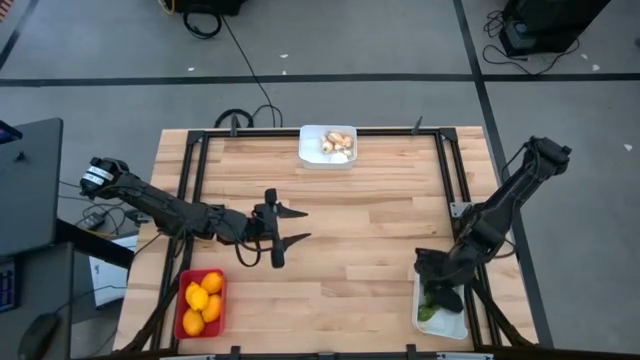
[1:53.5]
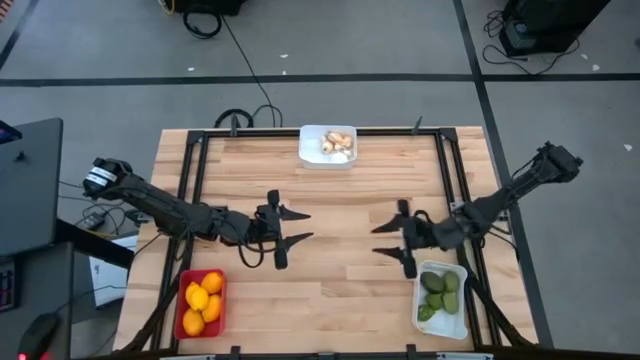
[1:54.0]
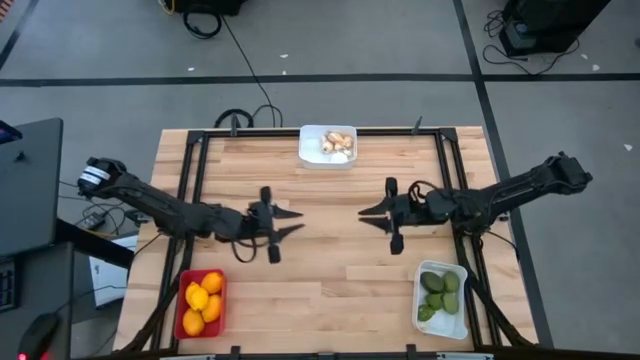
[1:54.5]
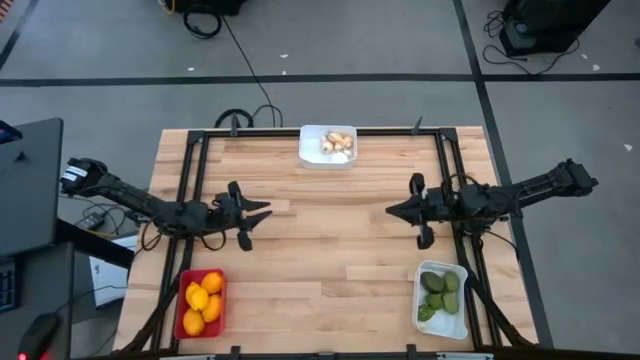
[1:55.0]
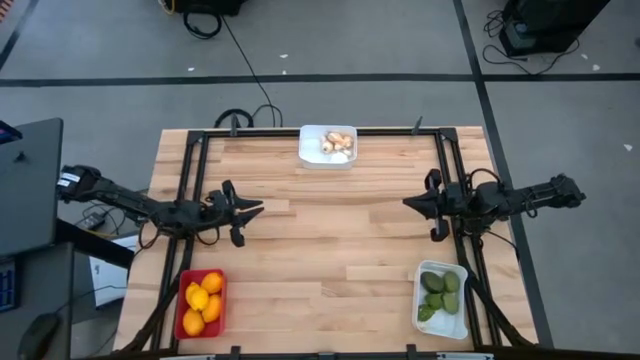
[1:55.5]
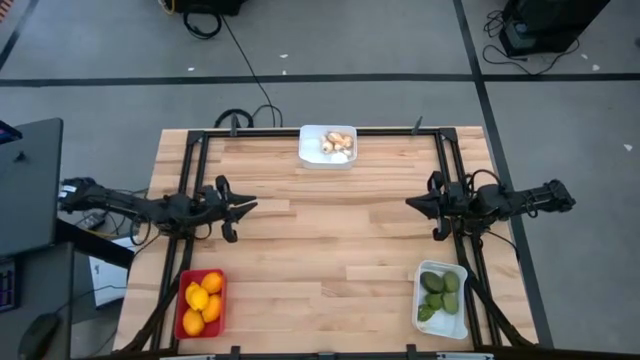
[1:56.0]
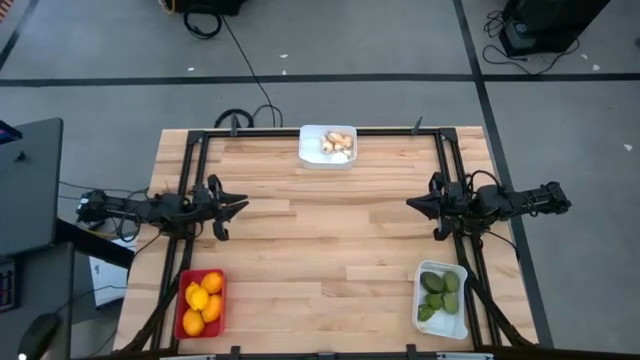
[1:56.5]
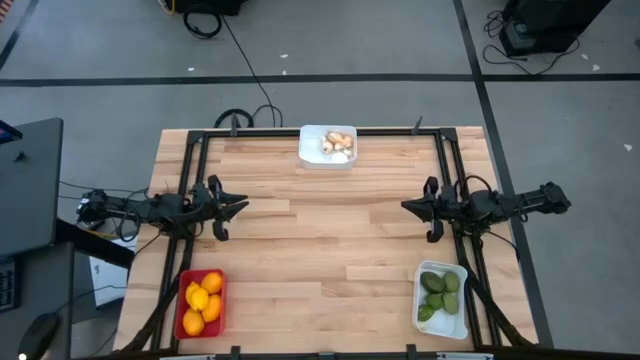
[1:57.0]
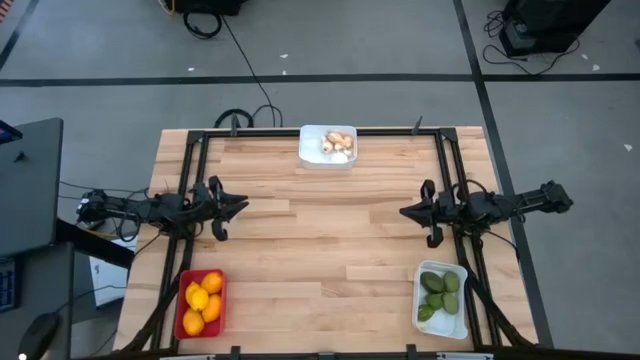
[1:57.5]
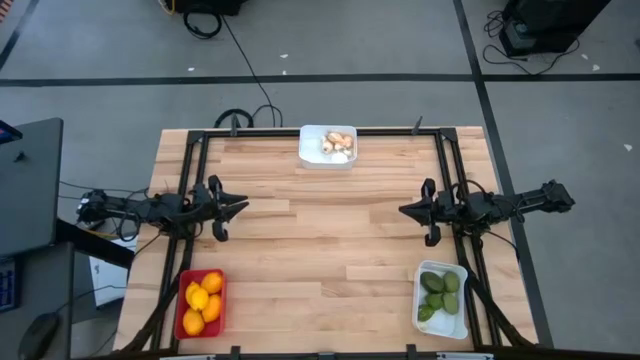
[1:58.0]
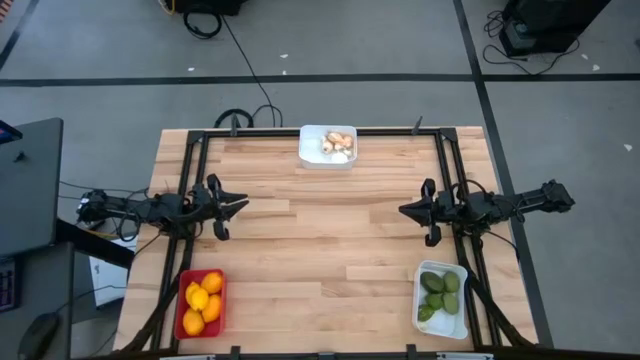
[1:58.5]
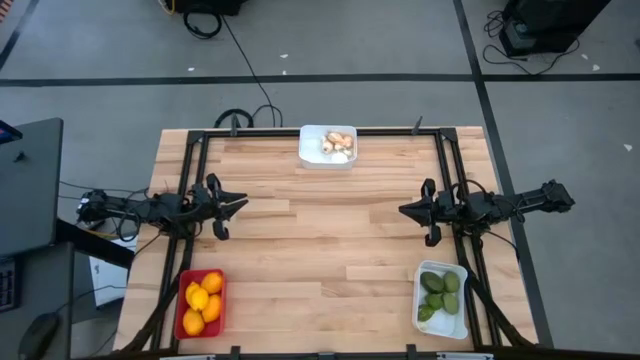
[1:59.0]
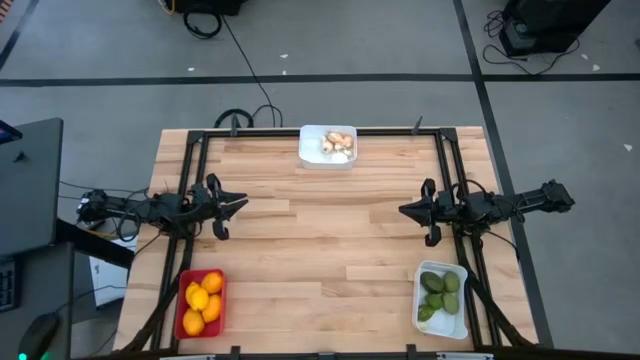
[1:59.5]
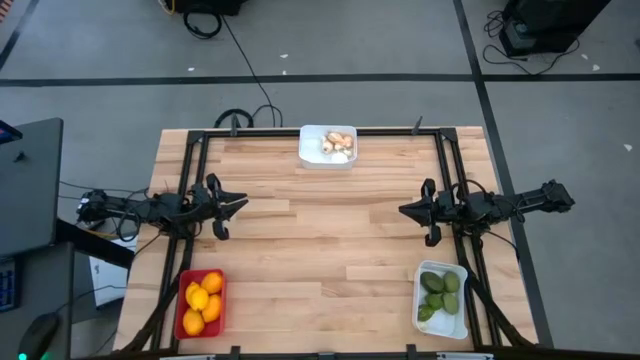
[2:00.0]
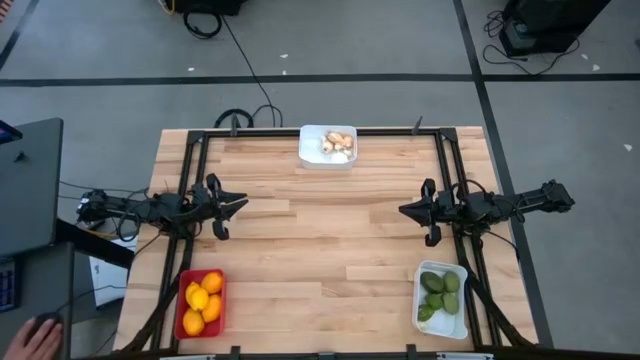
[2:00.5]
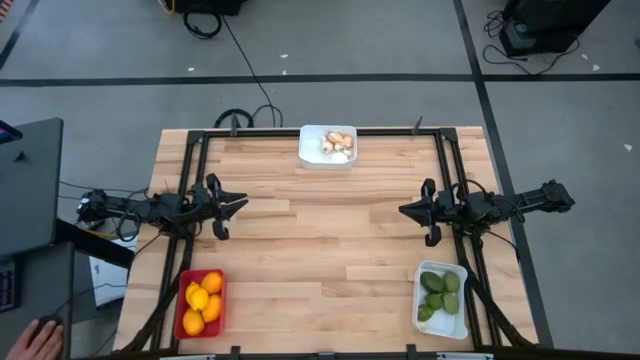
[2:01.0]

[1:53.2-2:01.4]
Task: Sort produce into baskets
Return to Home Position

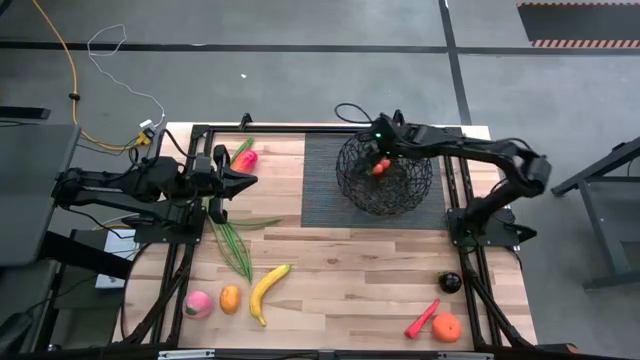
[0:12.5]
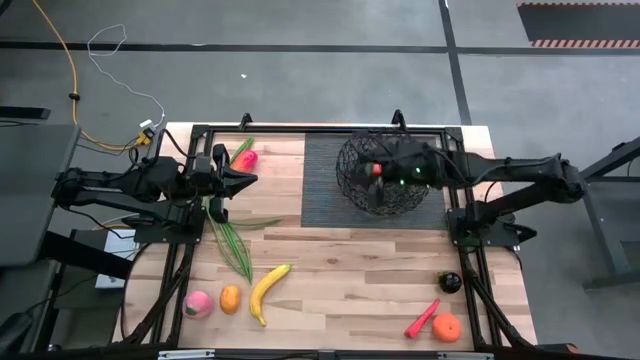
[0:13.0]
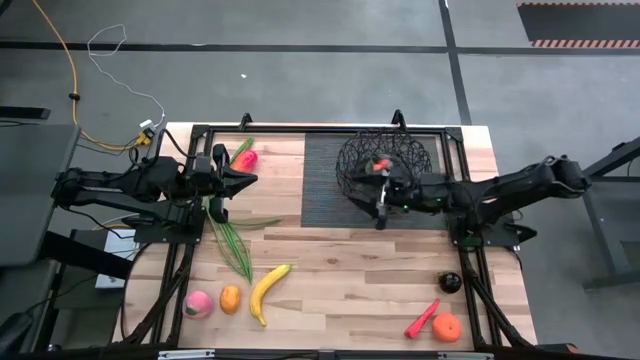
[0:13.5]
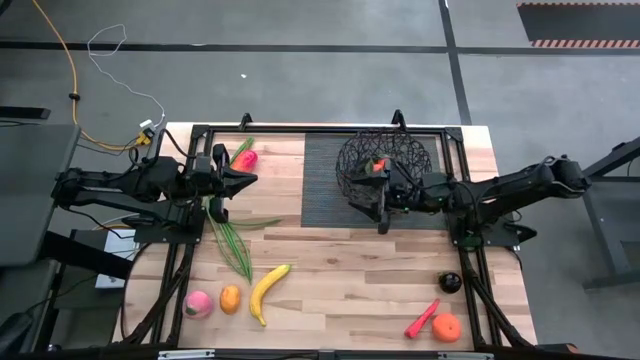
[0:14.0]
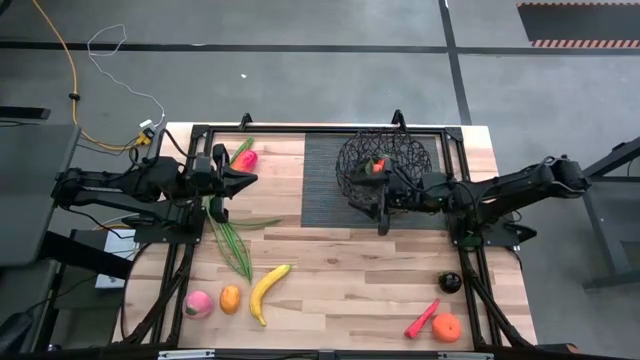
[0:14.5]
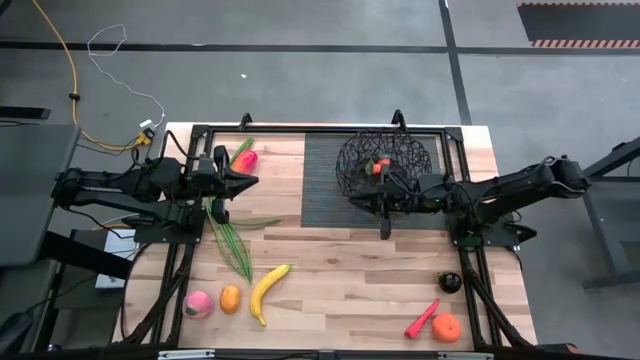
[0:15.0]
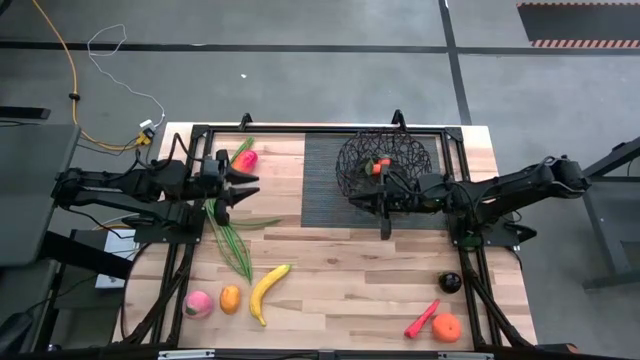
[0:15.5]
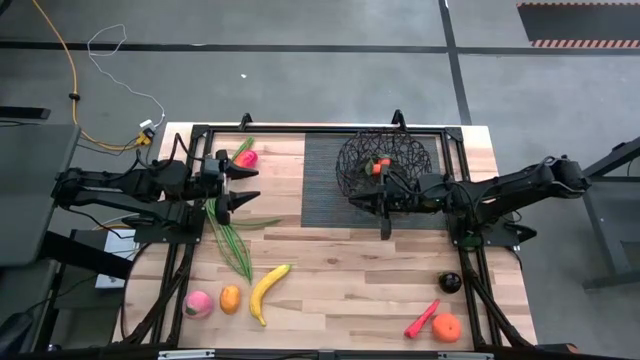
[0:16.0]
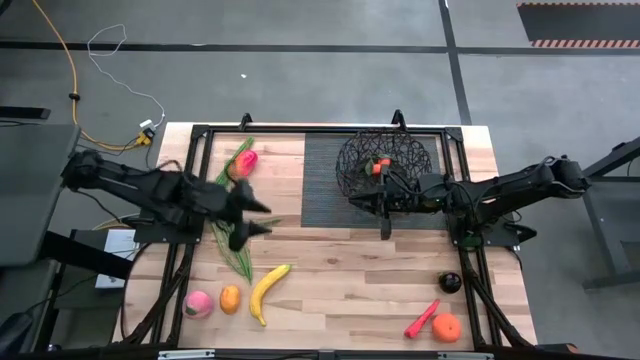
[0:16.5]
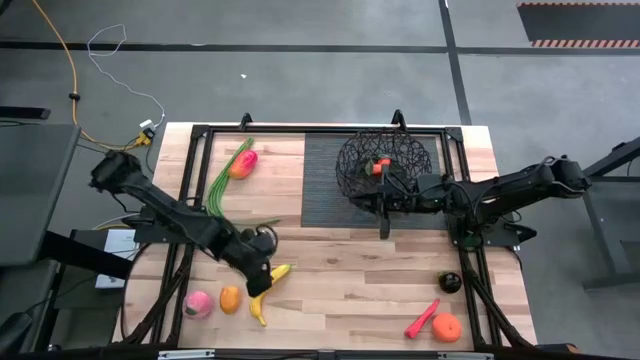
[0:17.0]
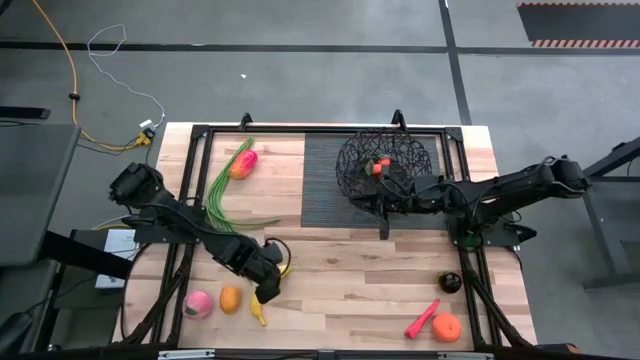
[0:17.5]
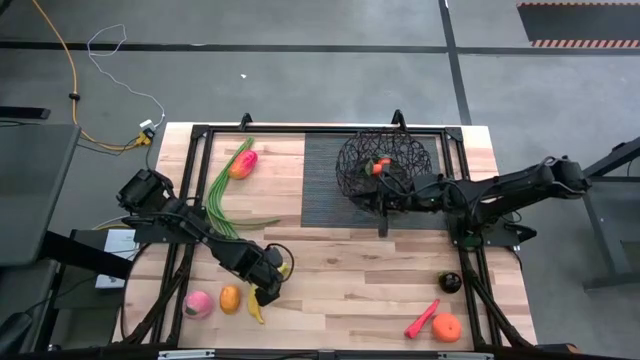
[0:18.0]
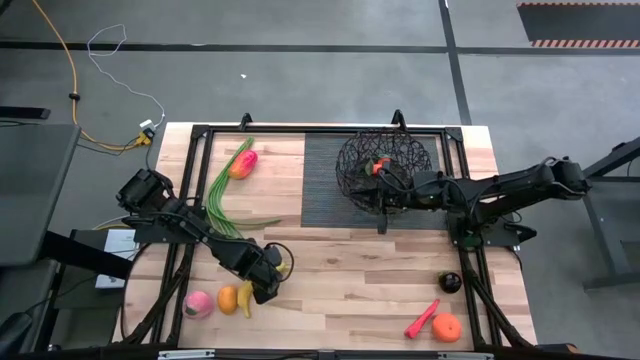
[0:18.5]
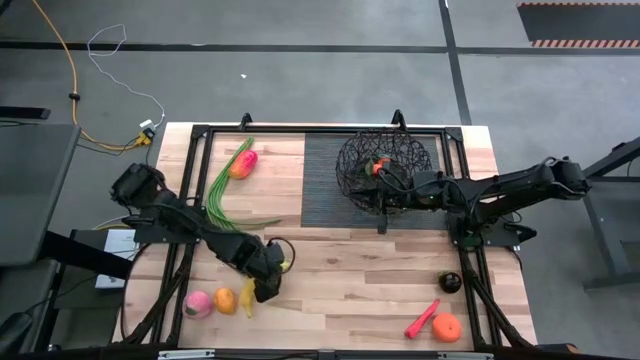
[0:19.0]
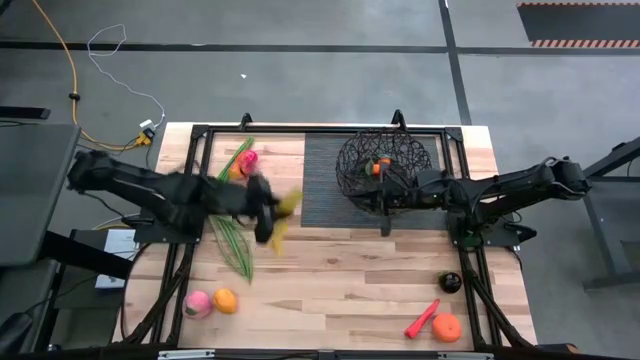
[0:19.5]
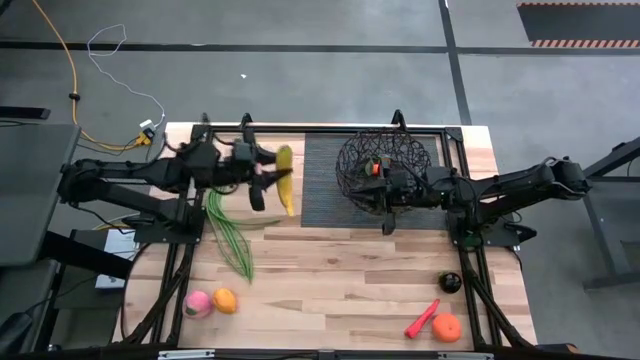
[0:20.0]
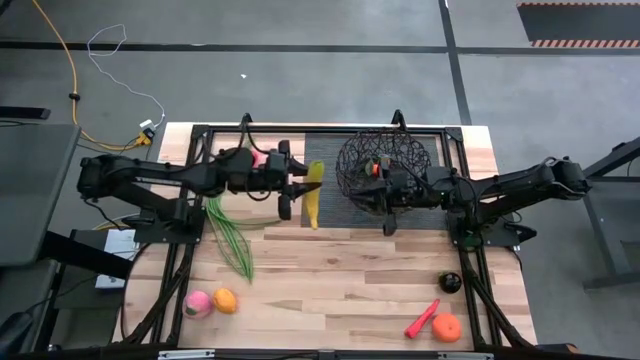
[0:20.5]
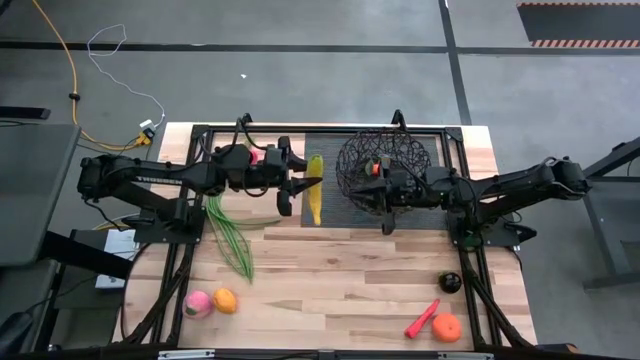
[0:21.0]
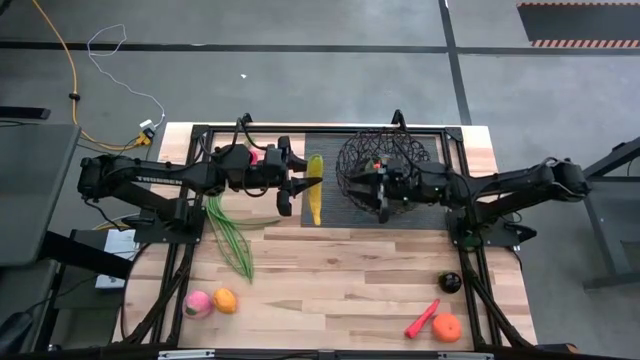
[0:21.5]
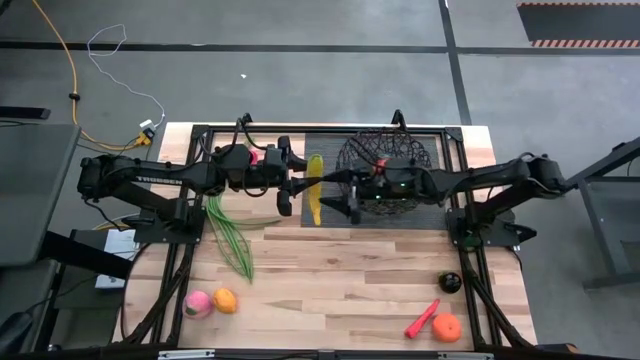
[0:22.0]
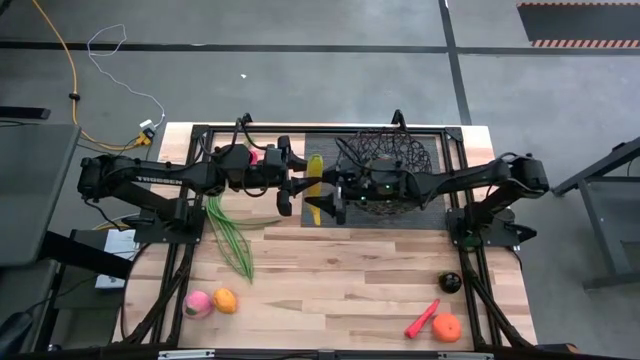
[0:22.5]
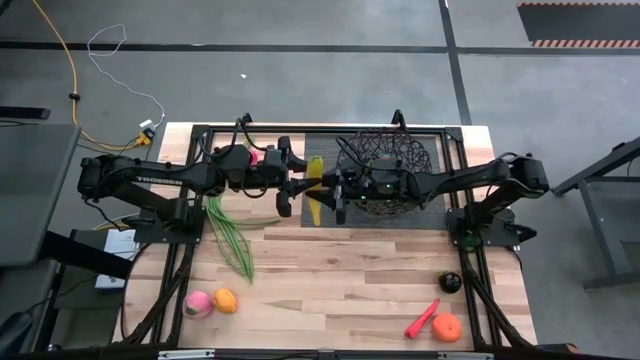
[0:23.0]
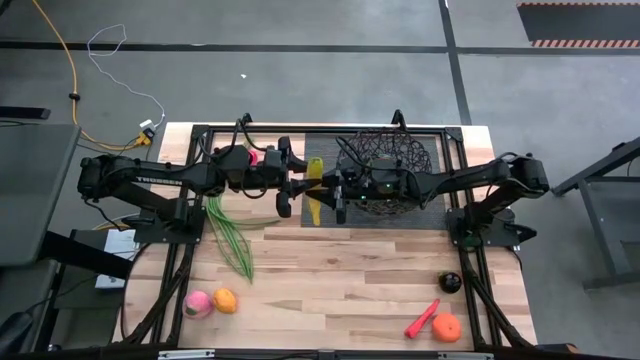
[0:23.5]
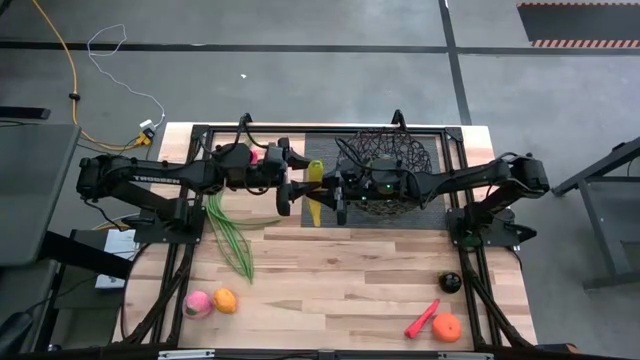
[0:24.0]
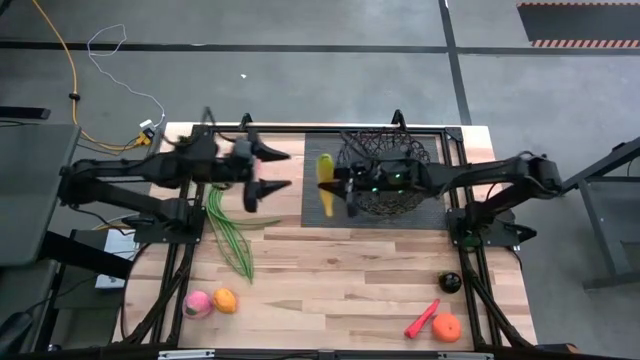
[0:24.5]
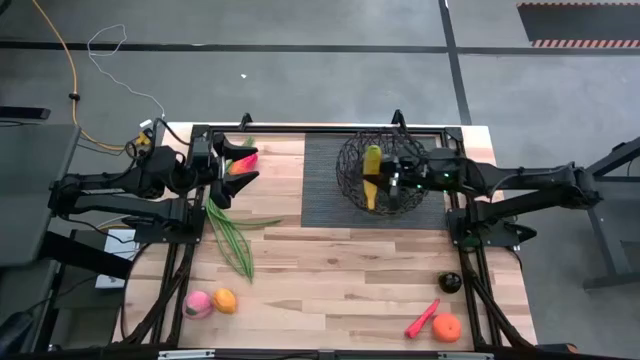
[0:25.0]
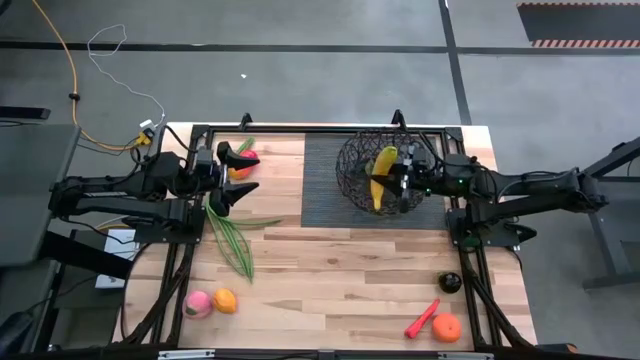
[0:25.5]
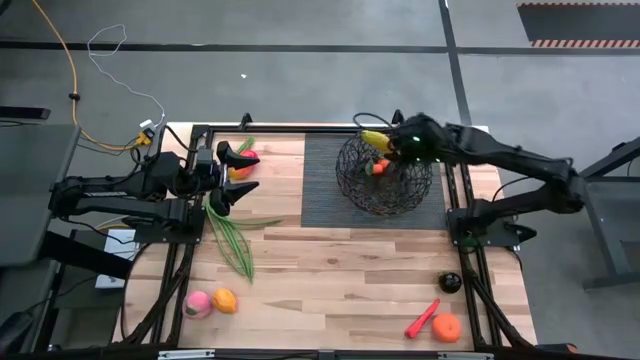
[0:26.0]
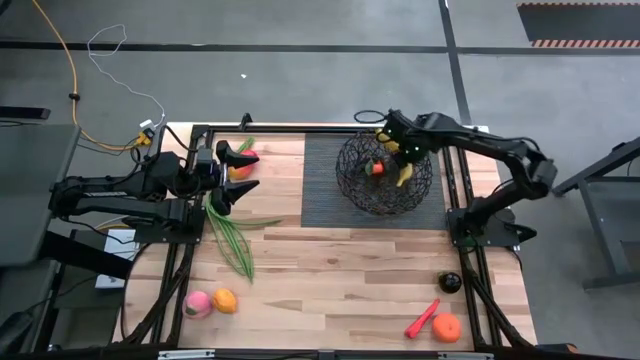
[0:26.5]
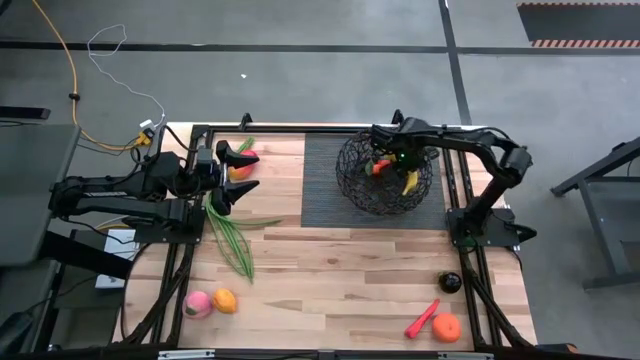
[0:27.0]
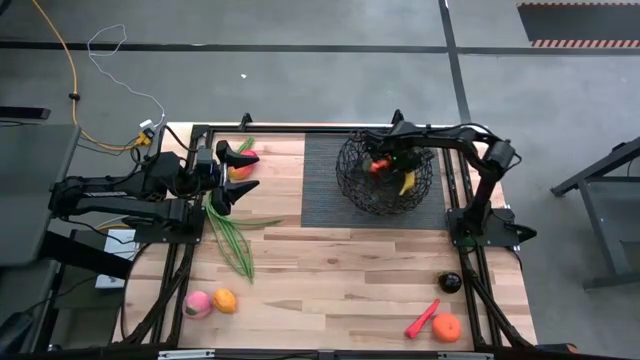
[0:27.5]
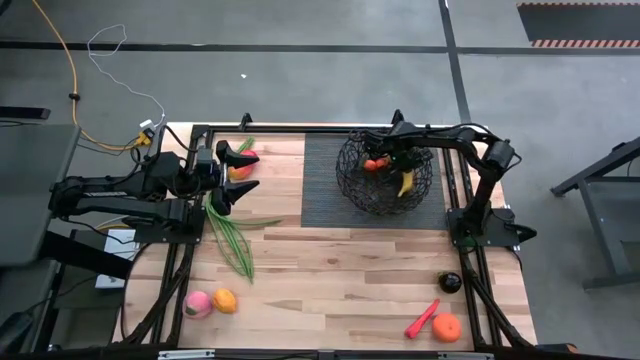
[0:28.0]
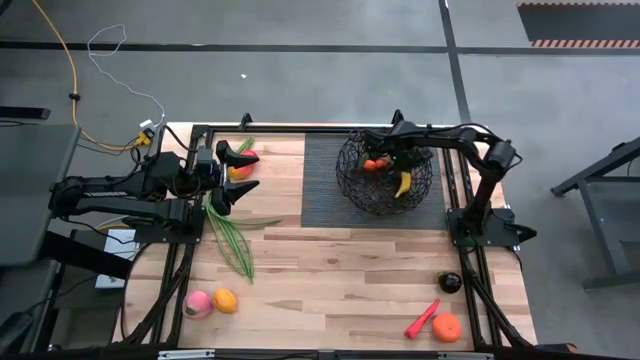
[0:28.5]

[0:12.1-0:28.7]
Task: Build produce basket
Put the yellow banana into the black basket
